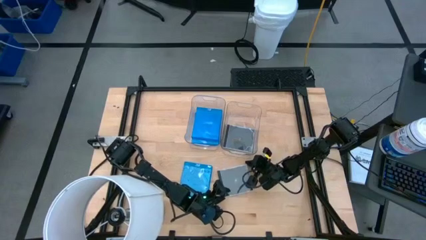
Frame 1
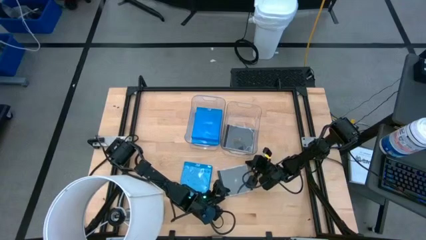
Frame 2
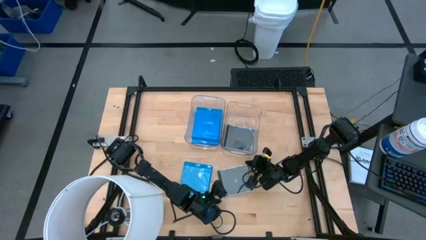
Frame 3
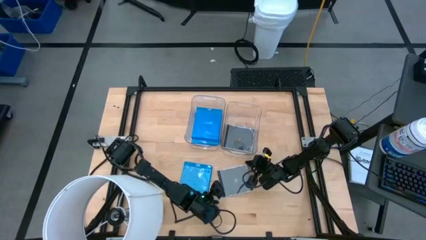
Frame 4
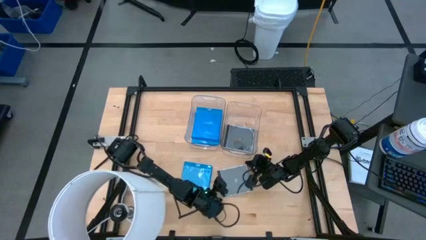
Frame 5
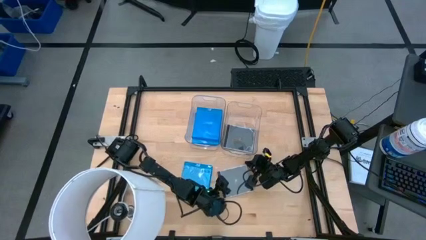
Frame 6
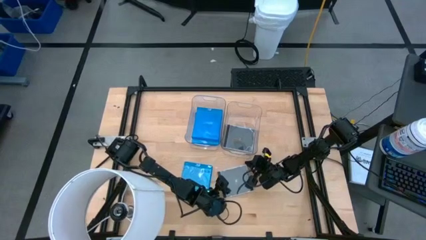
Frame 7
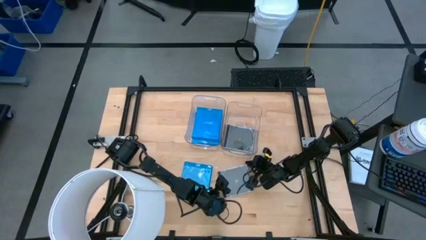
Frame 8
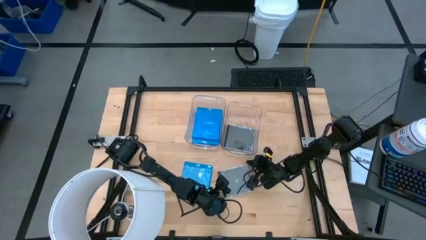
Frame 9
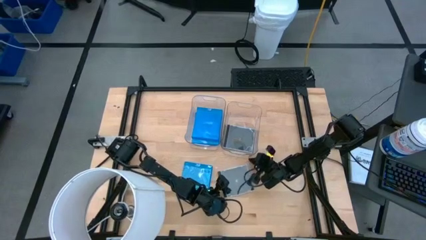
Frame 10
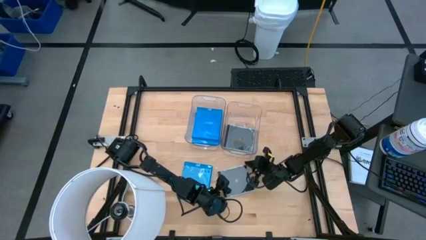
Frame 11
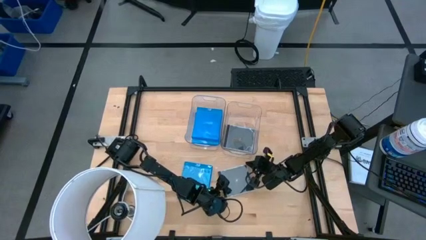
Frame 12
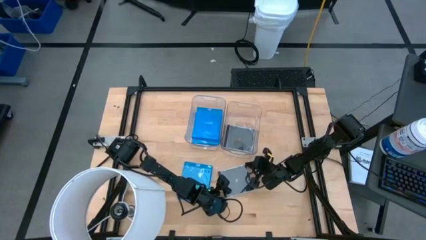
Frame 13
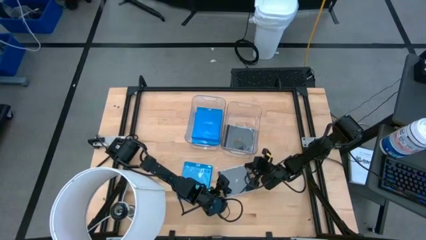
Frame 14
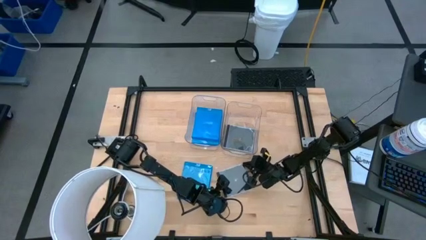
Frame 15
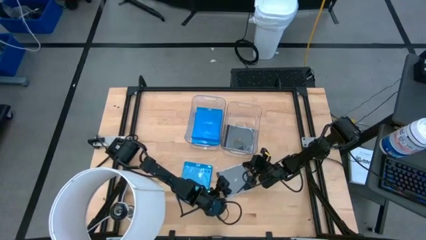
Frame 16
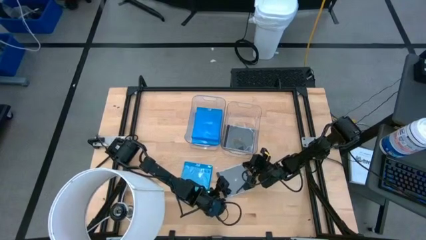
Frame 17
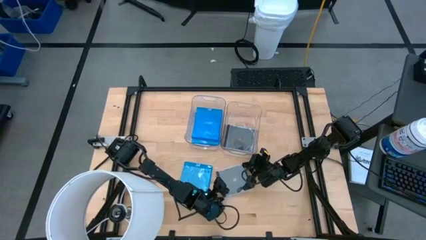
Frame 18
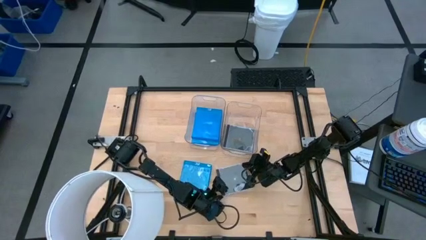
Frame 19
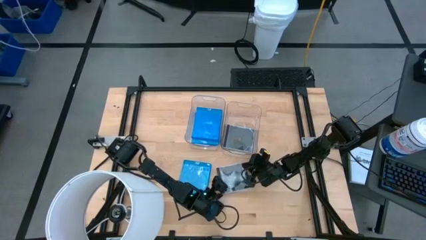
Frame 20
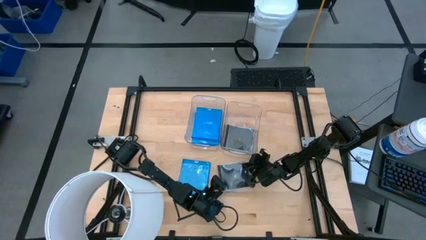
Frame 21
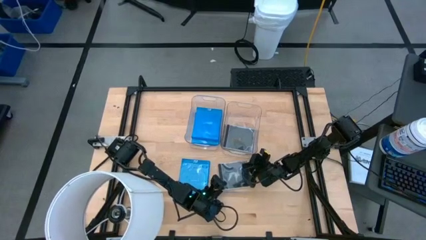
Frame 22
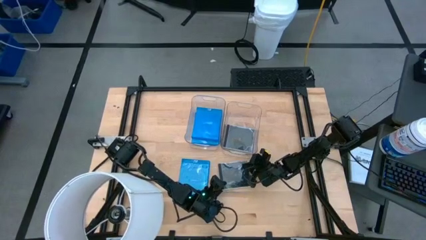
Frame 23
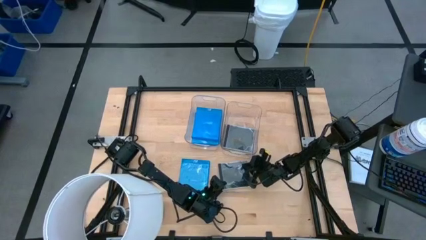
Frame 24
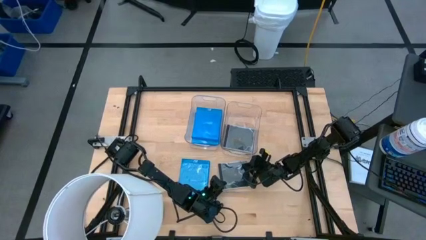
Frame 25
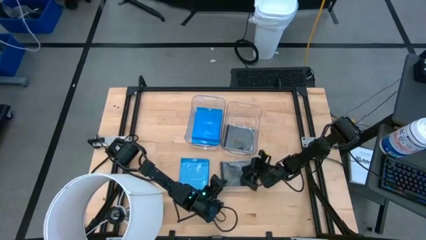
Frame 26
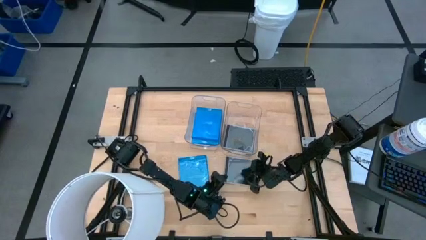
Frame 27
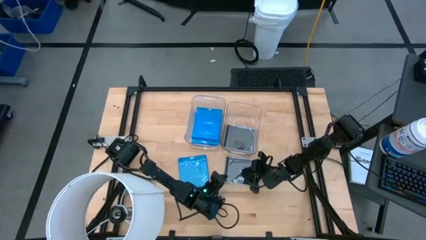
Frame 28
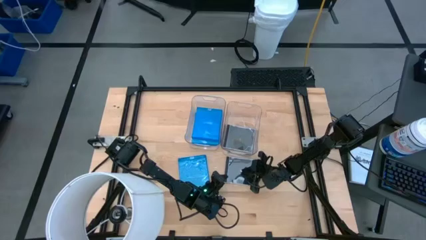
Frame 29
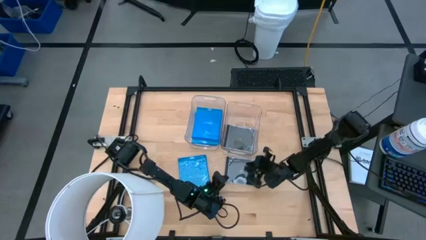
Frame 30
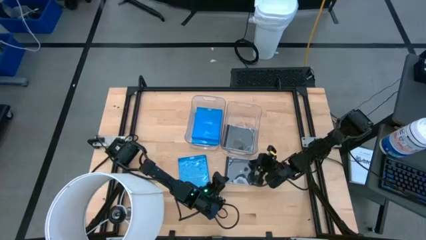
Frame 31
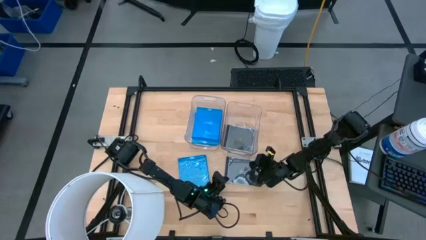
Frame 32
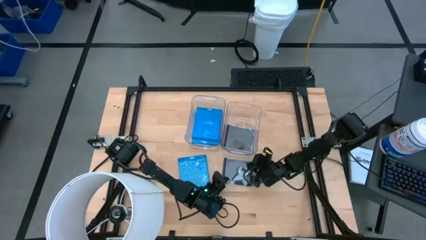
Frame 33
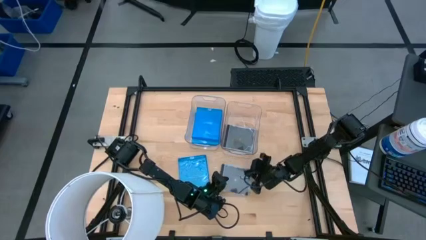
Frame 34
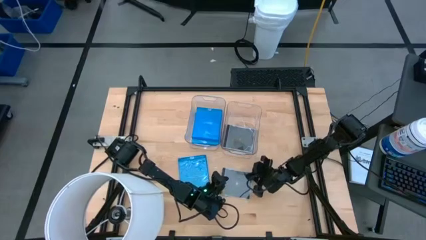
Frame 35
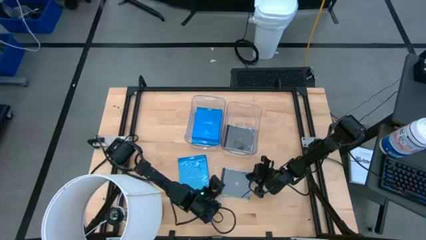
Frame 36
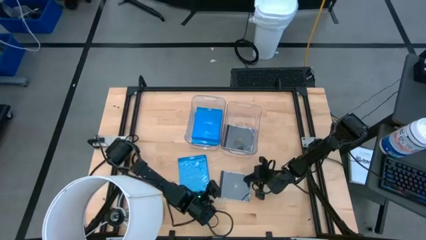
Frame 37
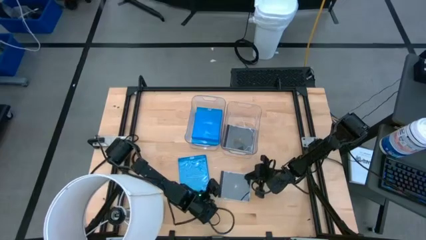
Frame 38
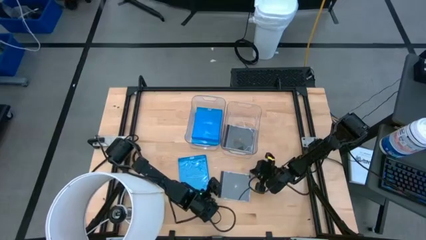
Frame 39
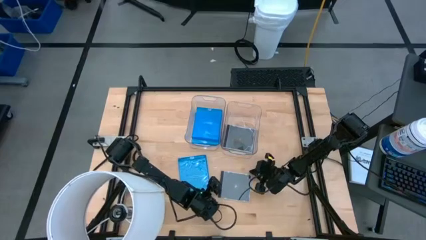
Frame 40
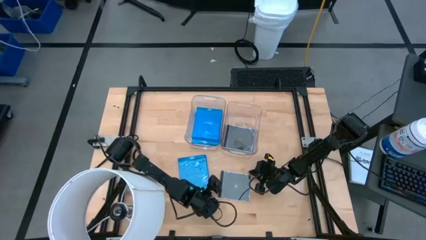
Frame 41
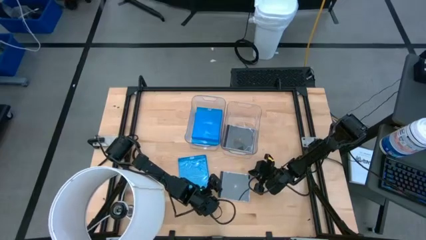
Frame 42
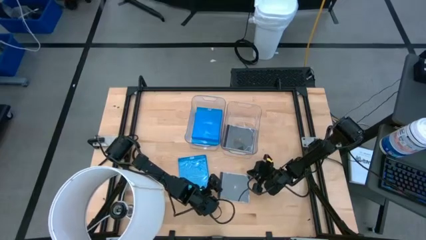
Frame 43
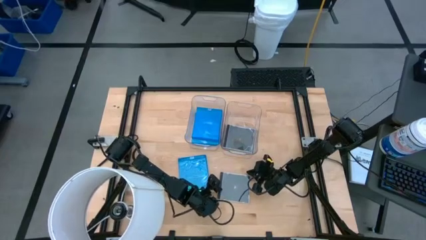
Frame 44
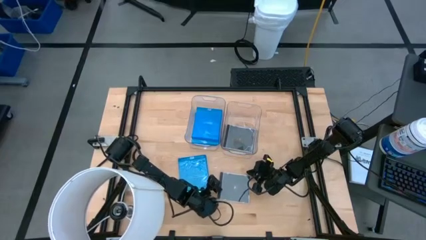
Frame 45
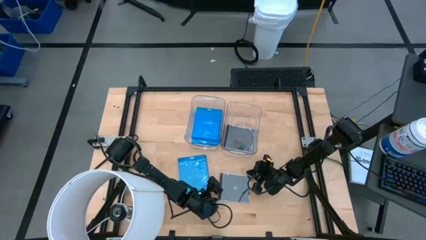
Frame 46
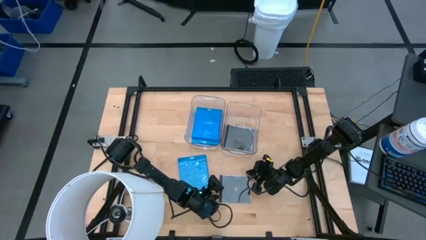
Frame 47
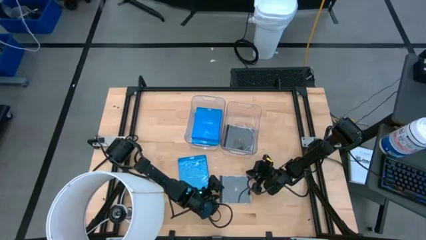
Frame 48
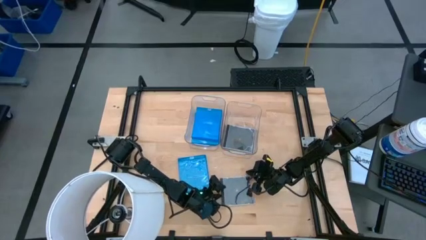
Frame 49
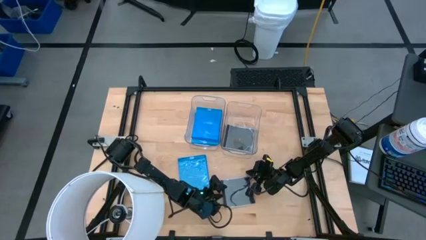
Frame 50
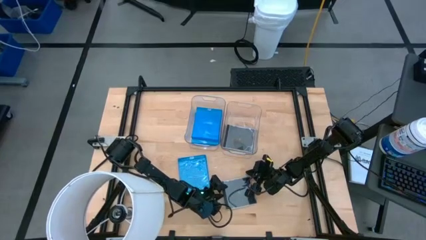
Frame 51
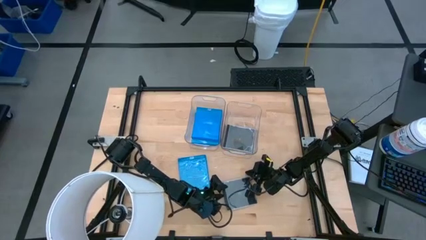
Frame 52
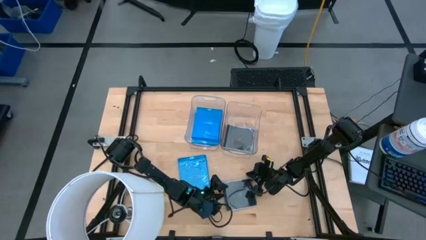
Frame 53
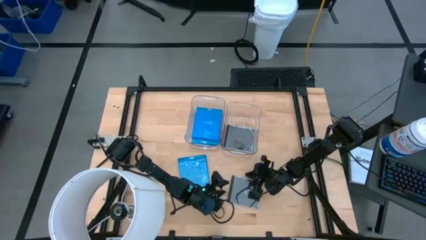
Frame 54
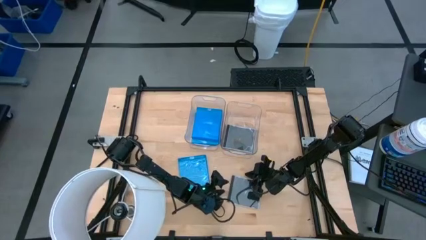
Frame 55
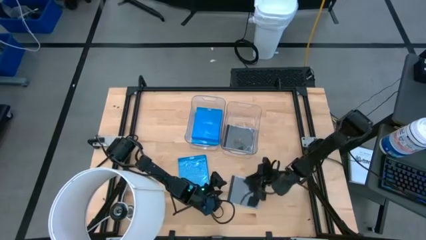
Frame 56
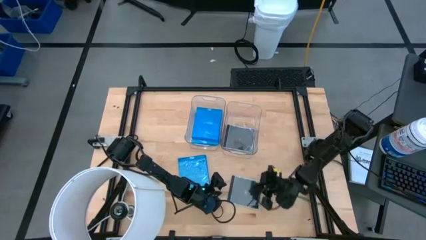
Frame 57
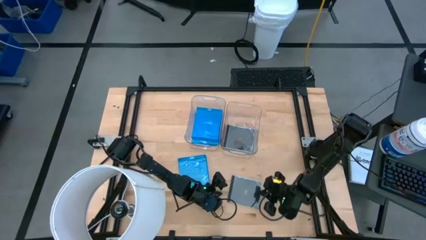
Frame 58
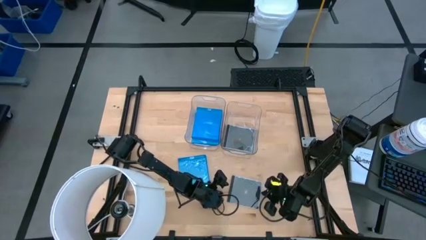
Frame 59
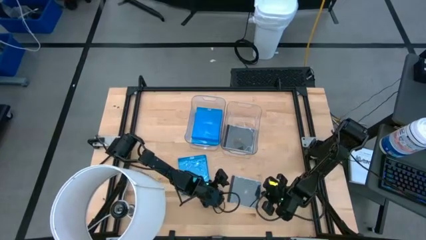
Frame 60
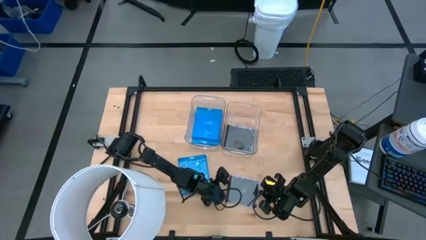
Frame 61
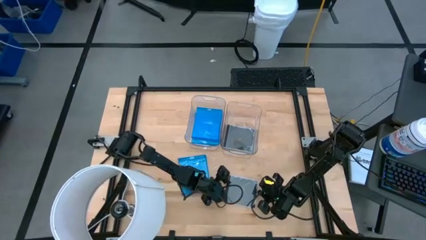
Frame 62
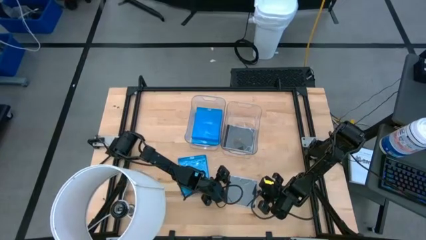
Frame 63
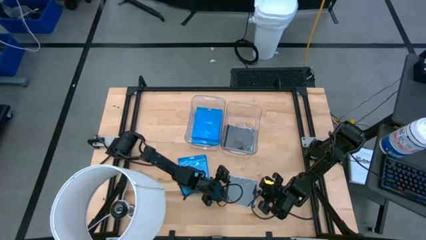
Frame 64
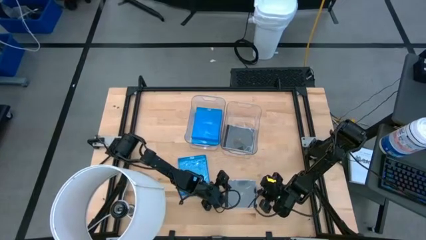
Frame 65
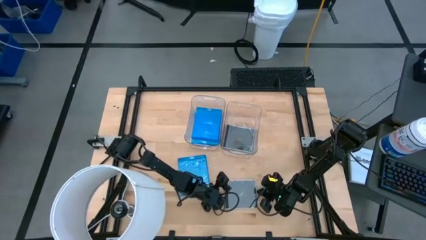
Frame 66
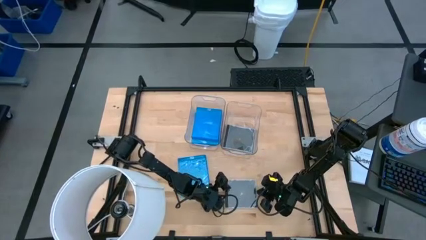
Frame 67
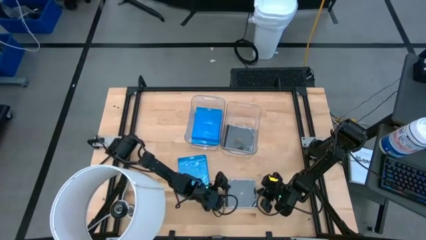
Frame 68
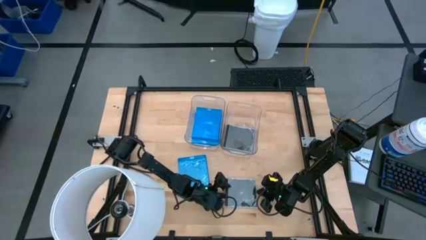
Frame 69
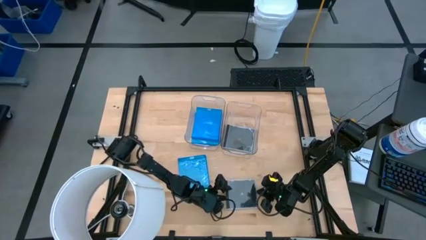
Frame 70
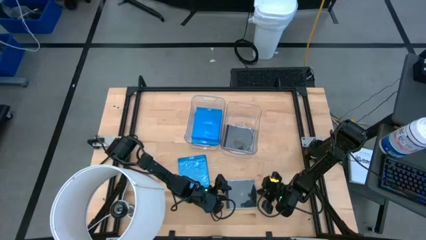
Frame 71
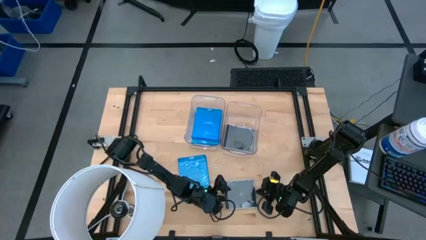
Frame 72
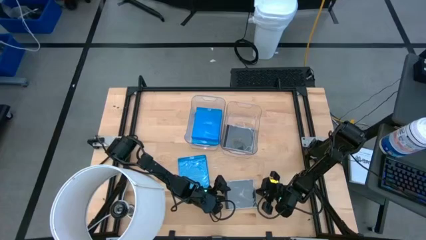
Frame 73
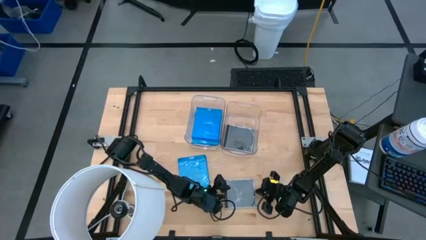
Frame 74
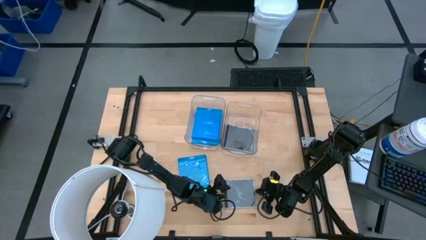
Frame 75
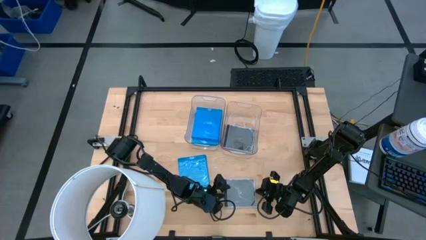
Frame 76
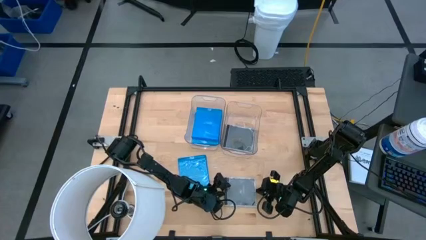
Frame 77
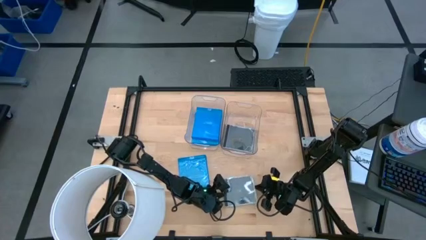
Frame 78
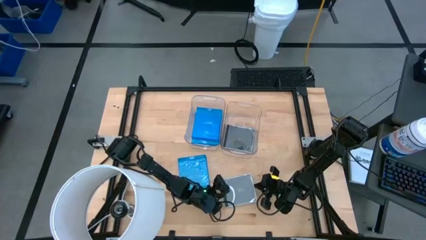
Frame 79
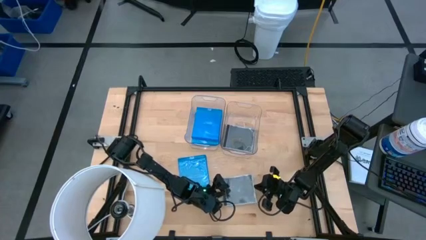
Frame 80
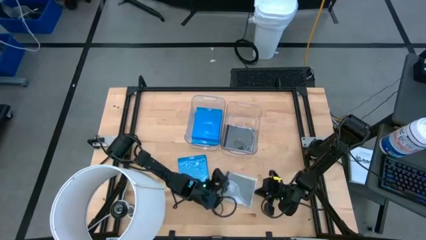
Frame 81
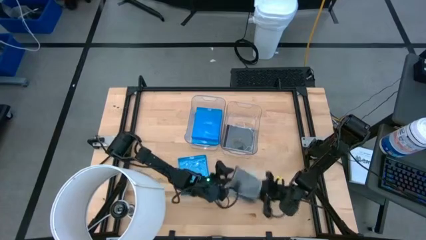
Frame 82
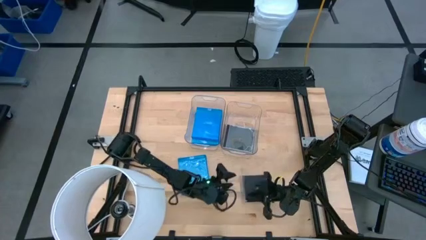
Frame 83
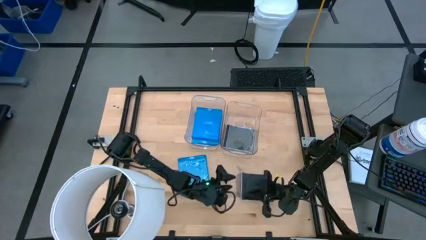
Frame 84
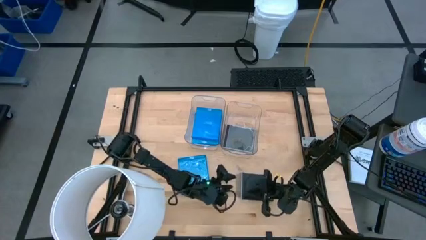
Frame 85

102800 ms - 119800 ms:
Task: Pick & place jewel cases by type
Put the black CD case into the right transparent bin
